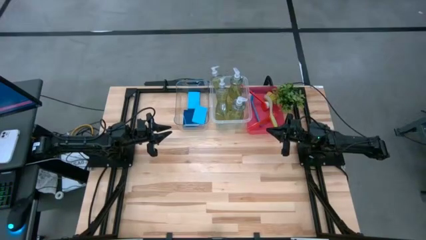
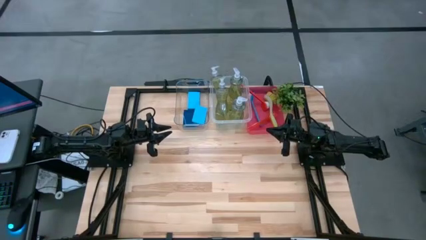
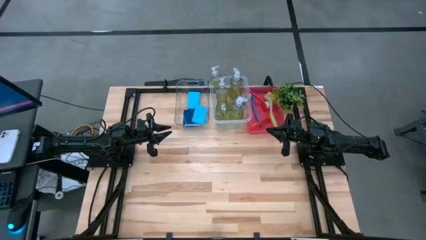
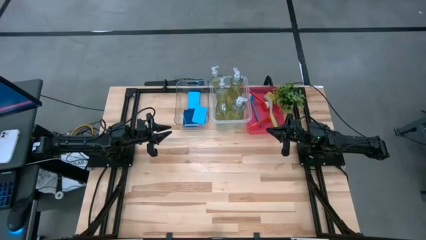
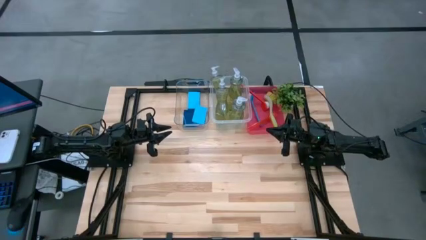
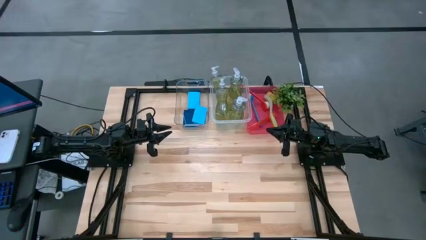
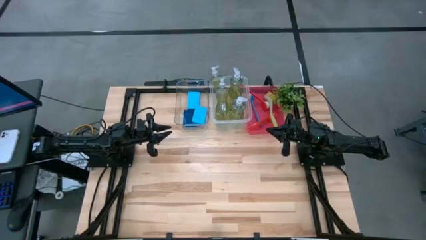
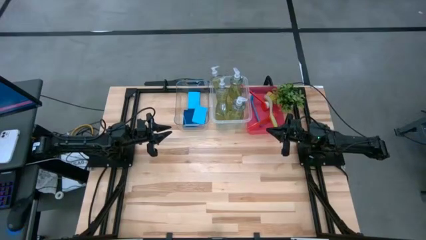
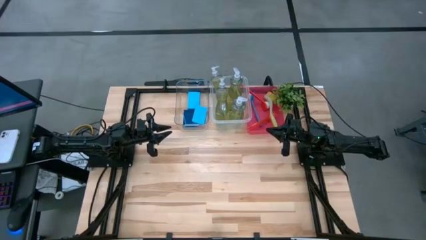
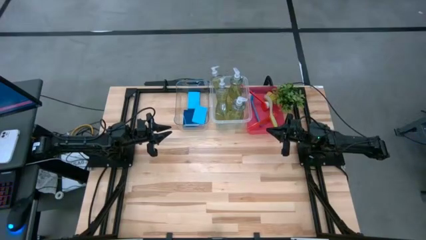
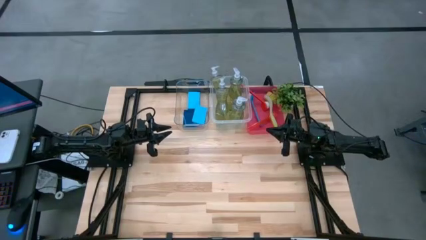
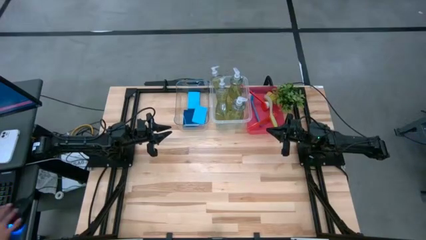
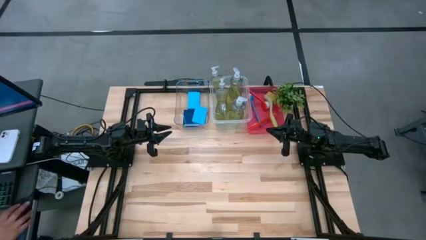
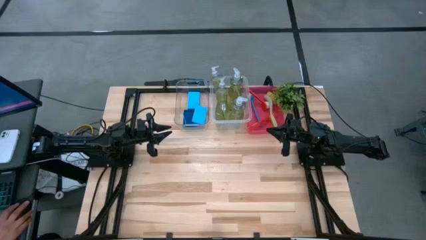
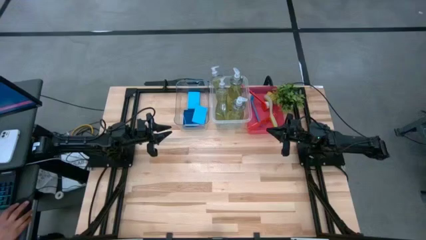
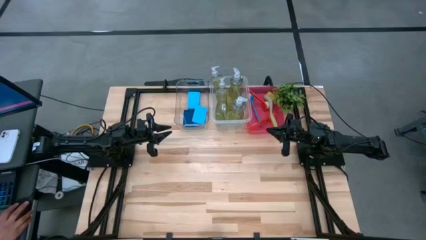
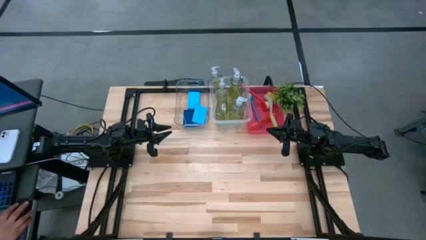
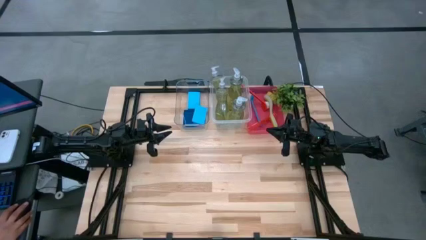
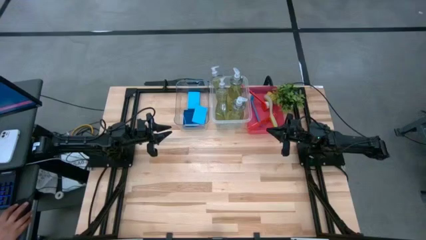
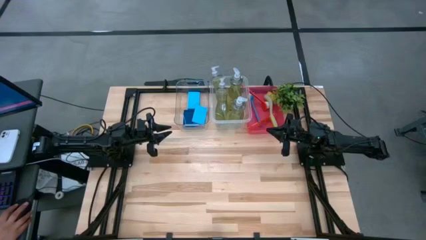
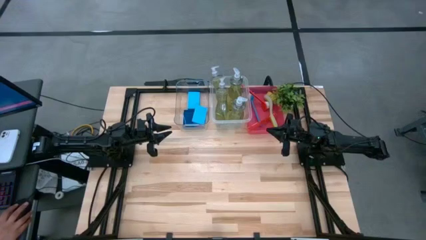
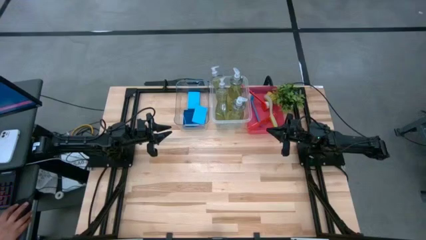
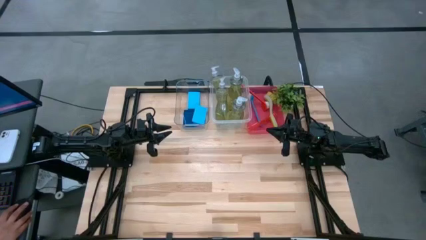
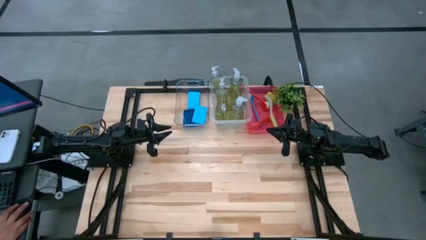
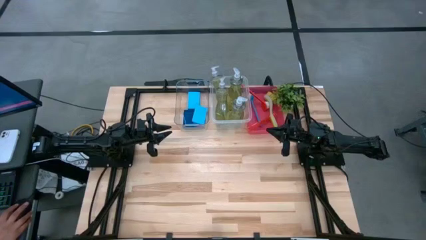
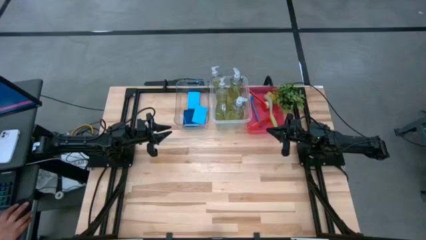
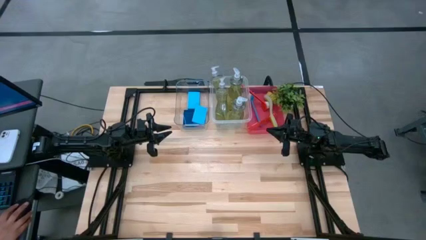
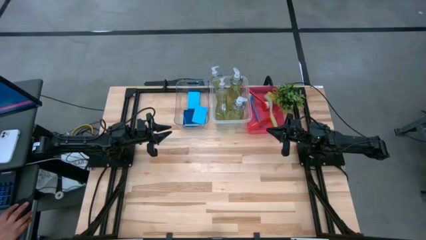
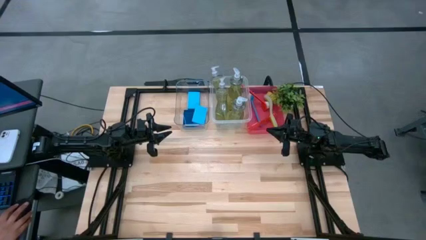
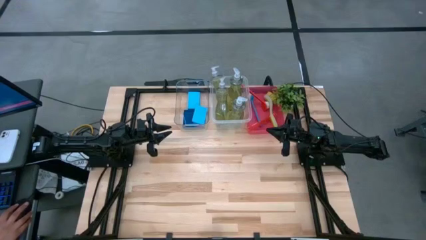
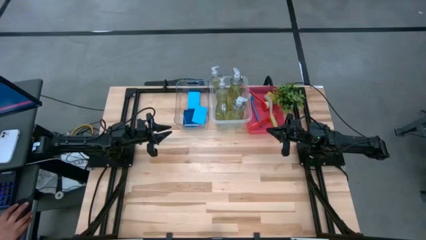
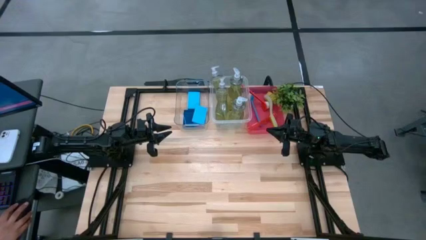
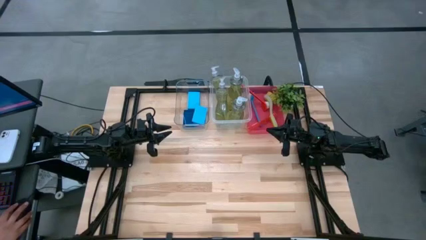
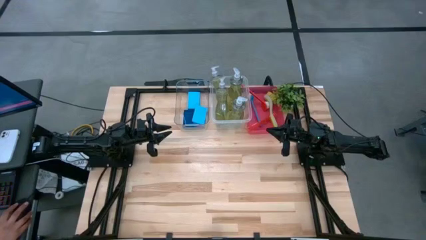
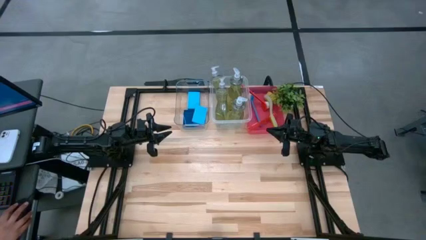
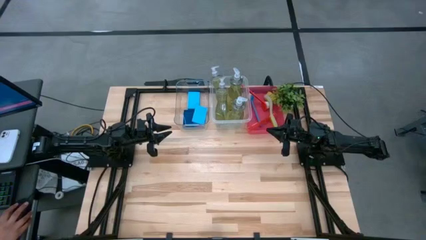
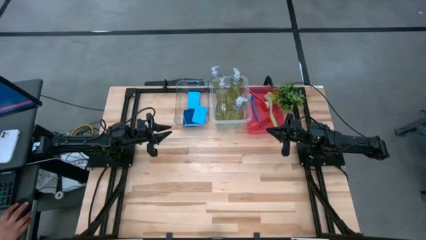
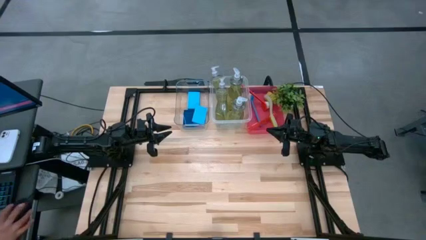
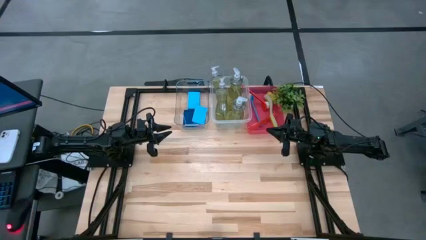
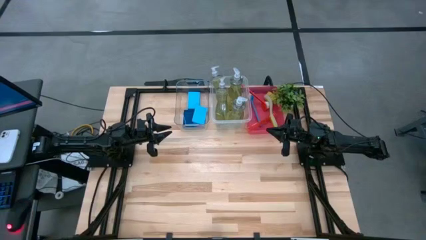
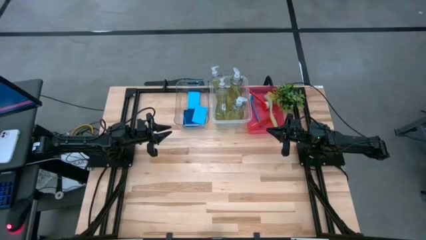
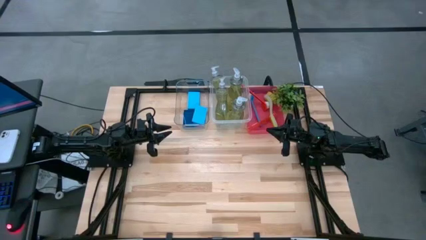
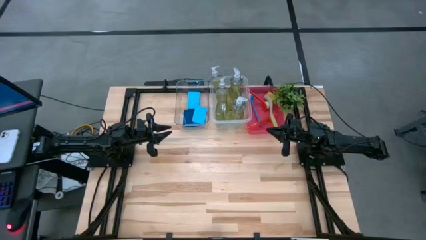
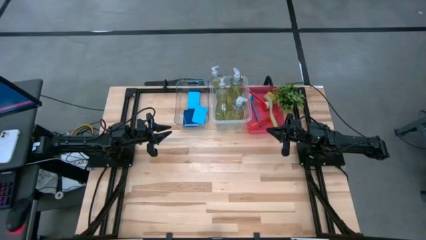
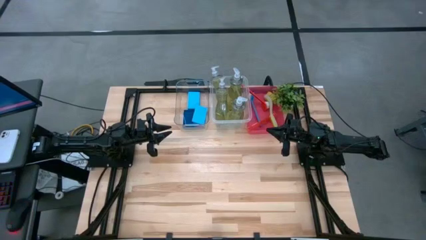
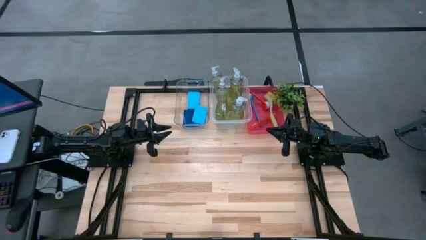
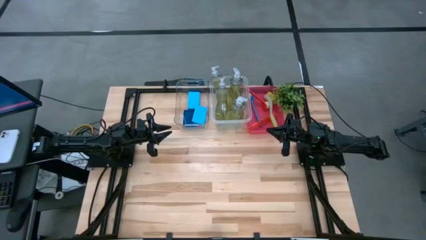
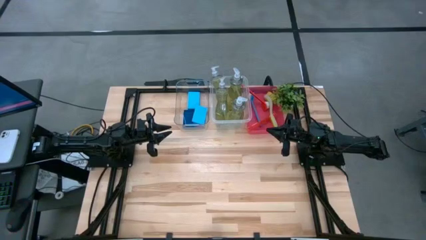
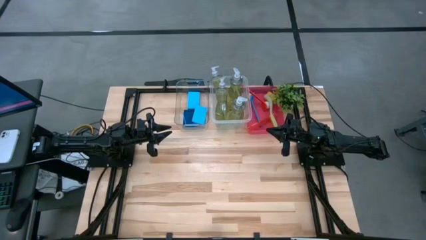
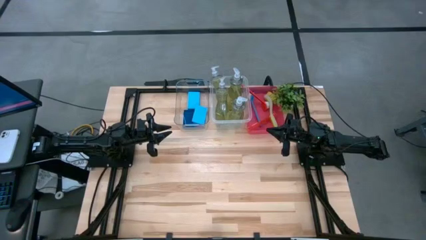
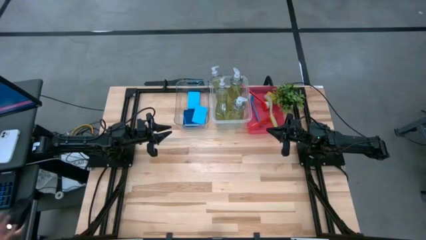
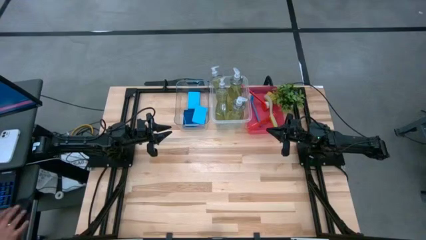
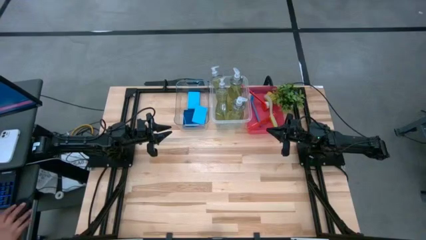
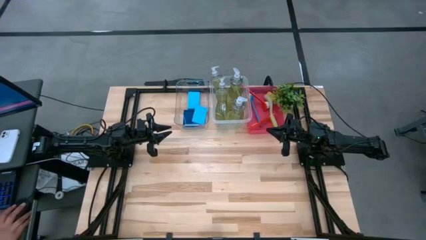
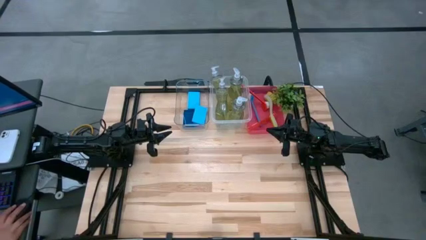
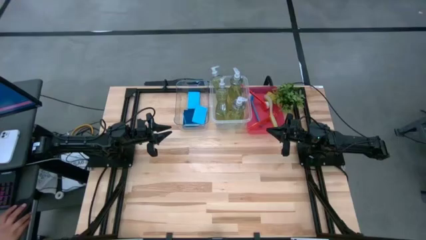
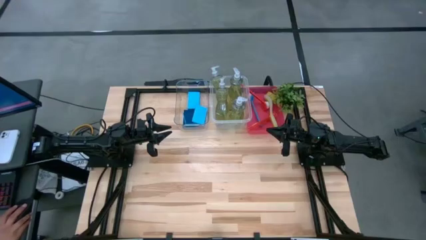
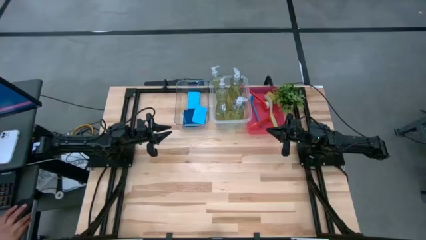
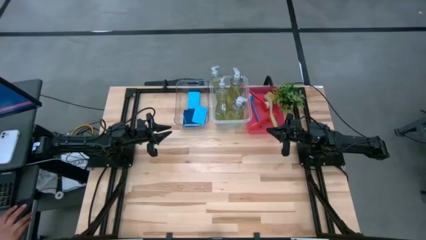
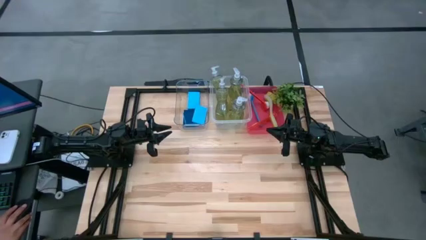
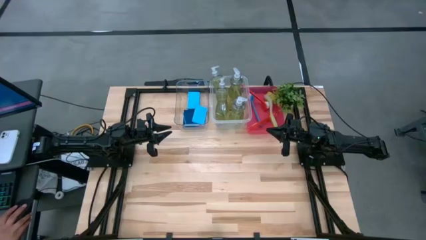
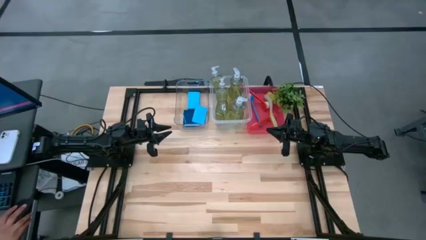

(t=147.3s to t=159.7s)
Task: Pick & Place Kitchen Sink Supplies
Return to Home Position
